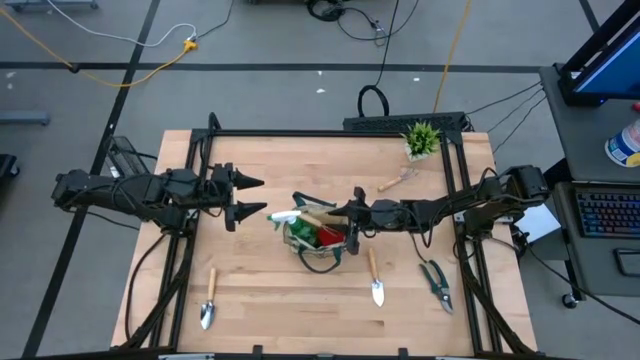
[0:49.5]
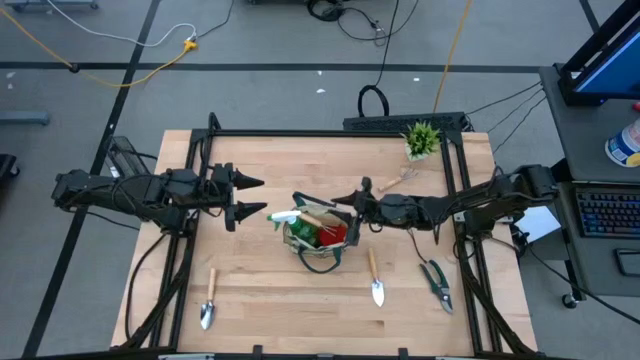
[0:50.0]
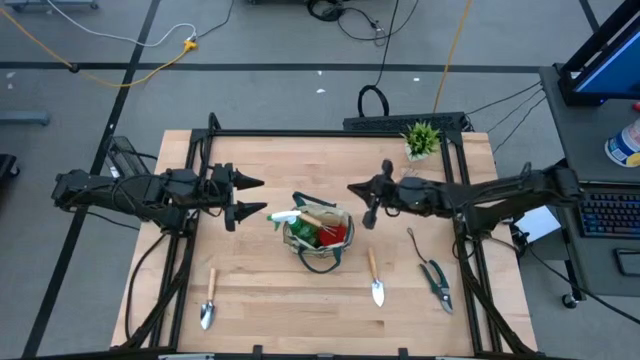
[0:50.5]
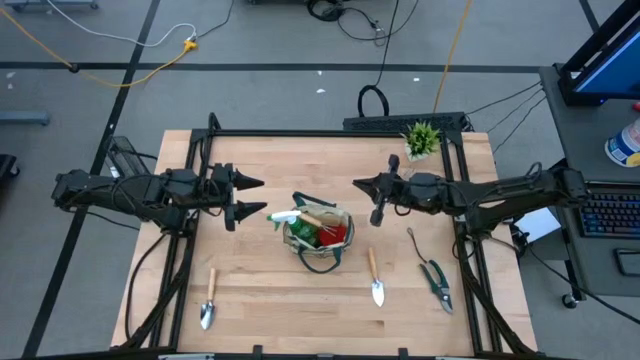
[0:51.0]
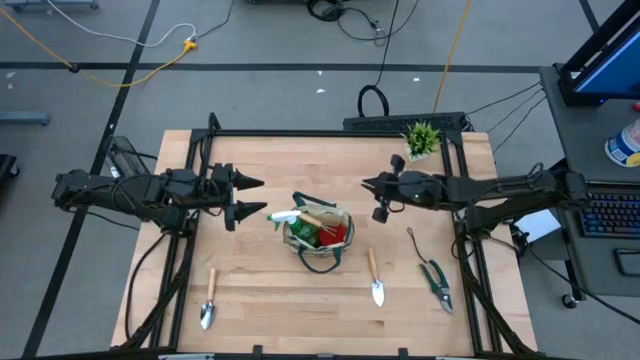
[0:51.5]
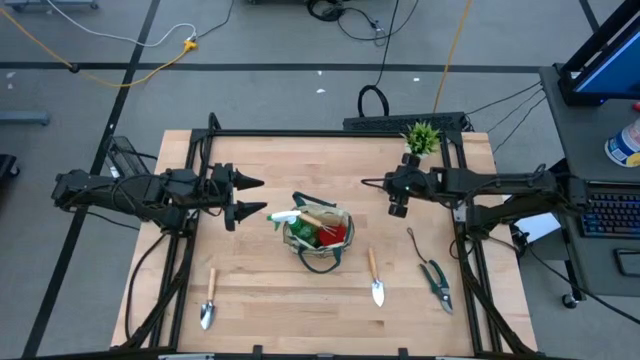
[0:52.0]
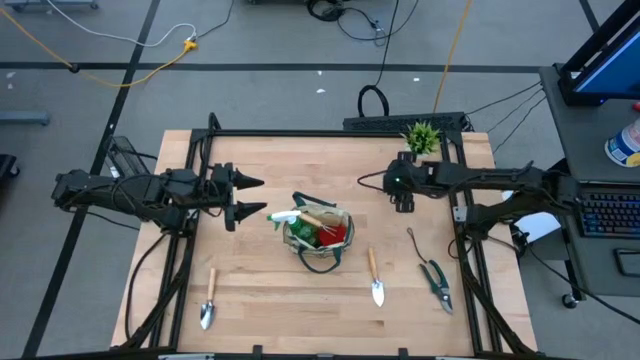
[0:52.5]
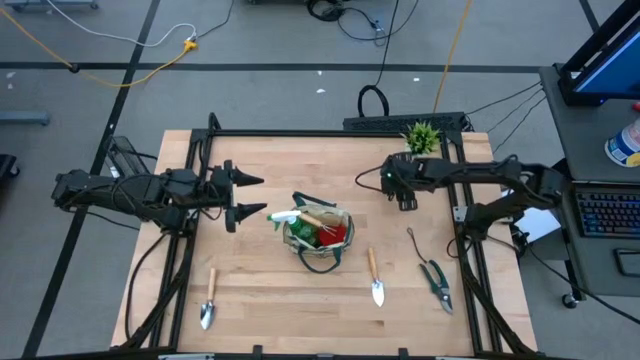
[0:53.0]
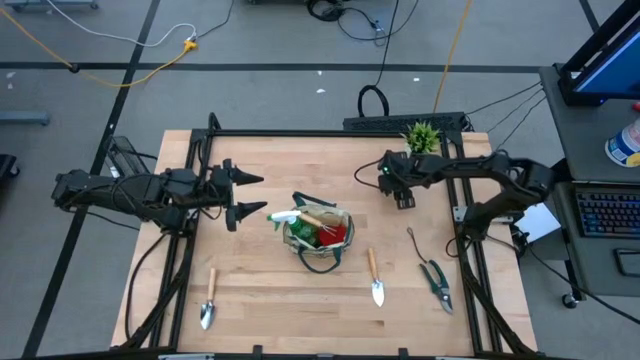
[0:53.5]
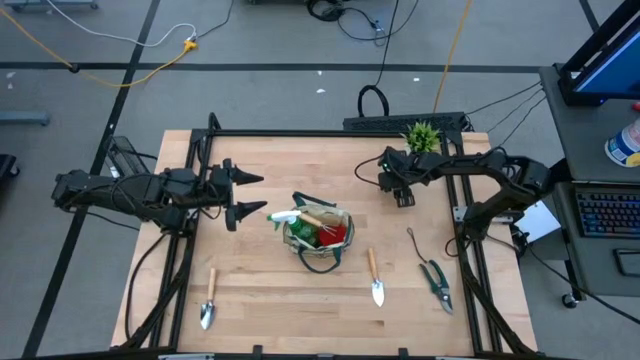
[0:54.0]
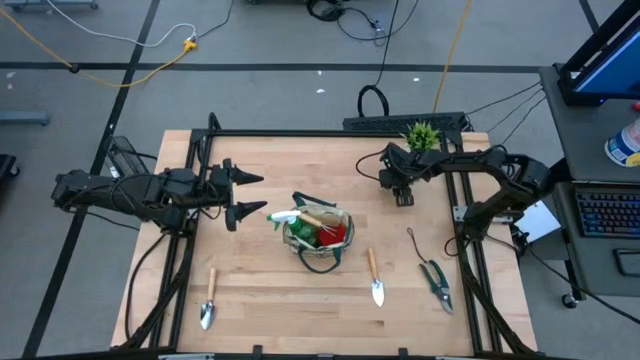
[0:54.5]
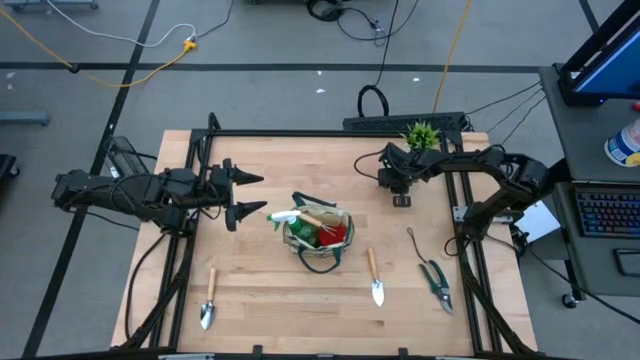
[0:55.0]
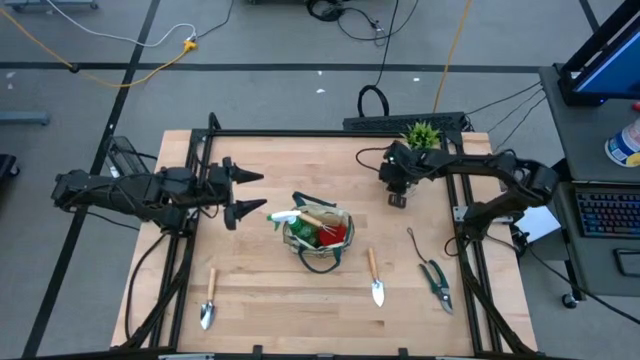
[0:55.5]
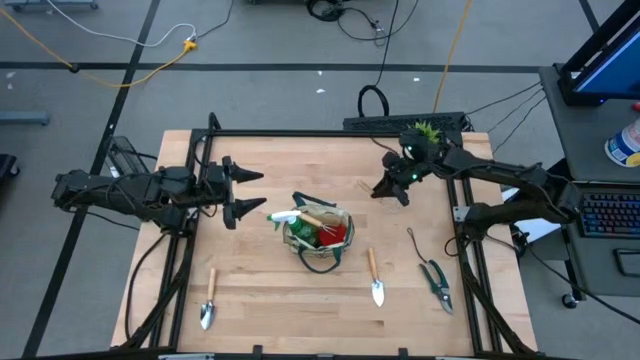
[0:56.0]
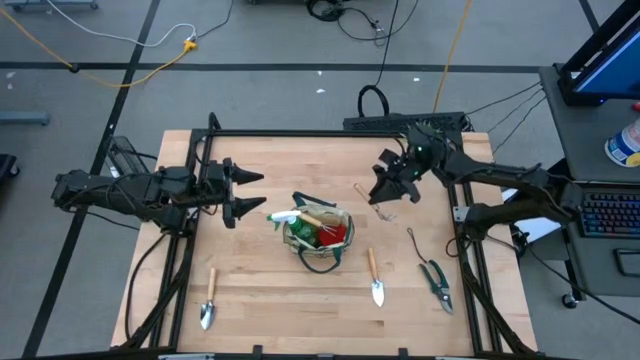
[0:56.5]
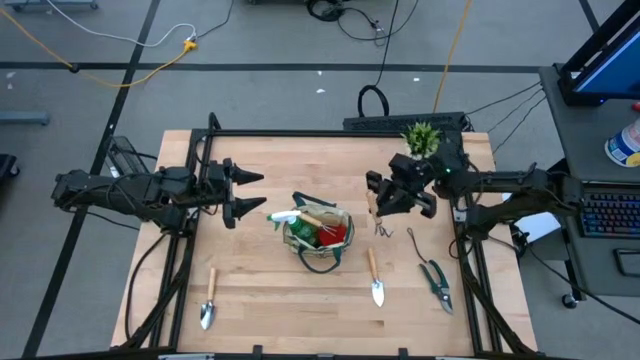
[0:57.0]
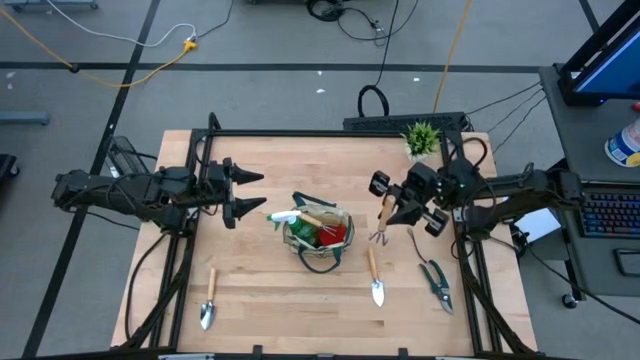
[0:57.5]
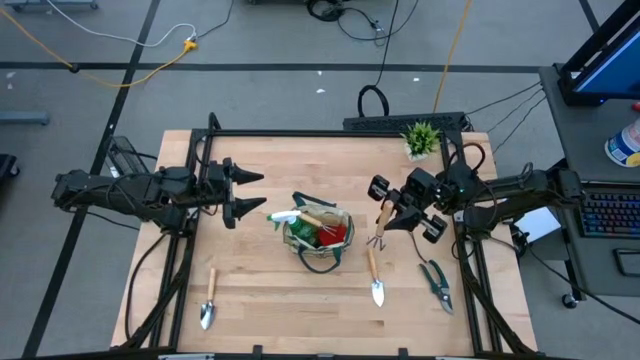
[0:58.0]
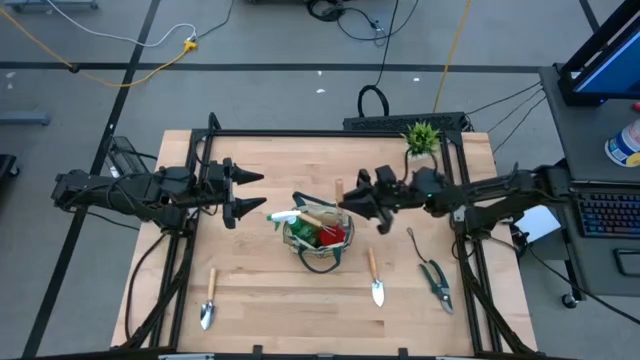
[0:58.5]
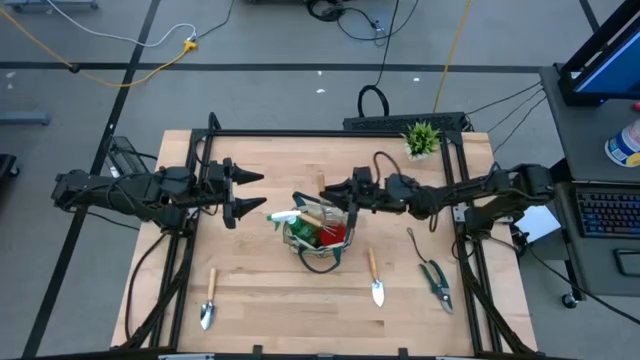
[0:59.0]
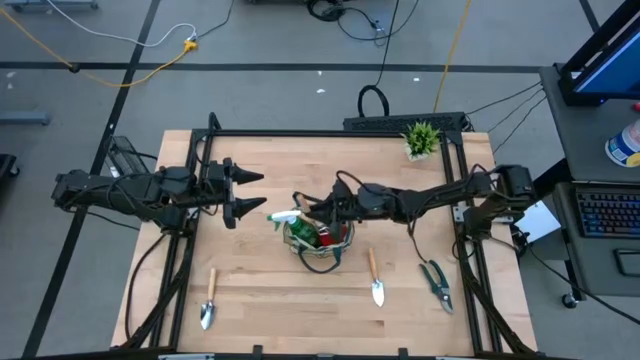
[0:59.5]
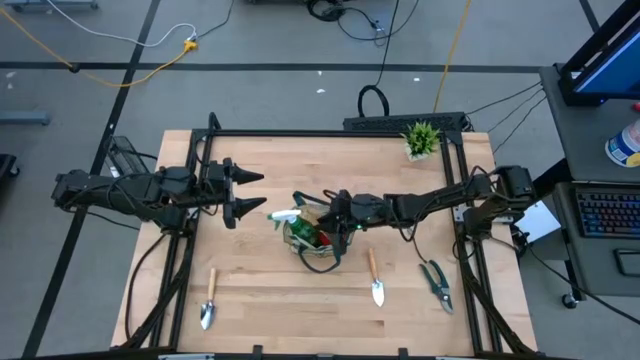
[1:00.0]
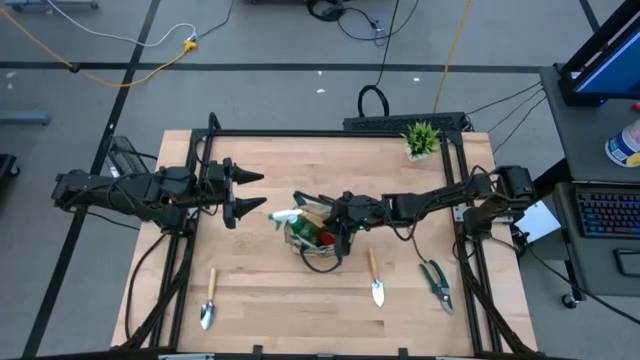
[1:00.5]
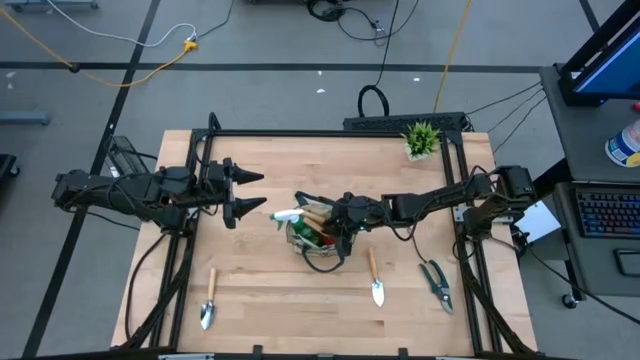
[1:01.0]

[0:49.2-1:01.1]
Task: Pick & Place Garden tools in Gardening bag
Put the brown hand rake into the gardening bag

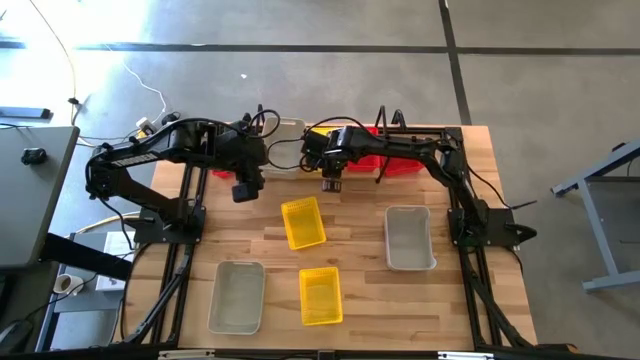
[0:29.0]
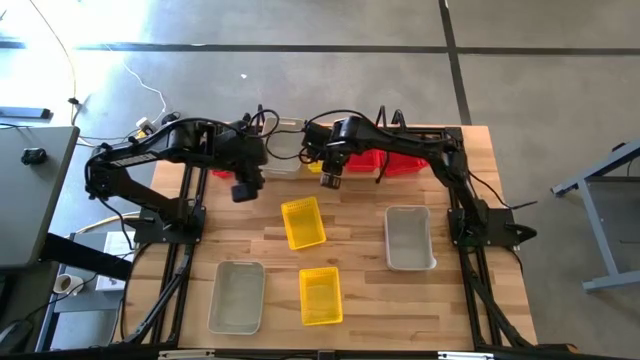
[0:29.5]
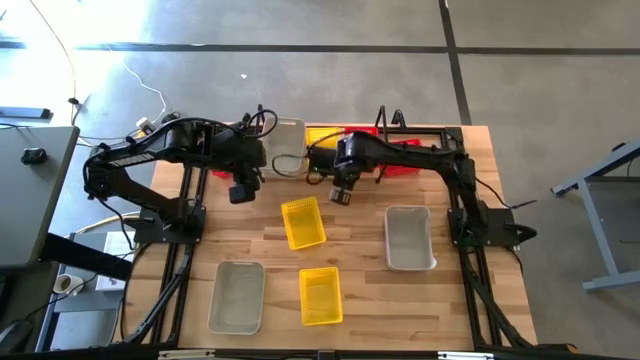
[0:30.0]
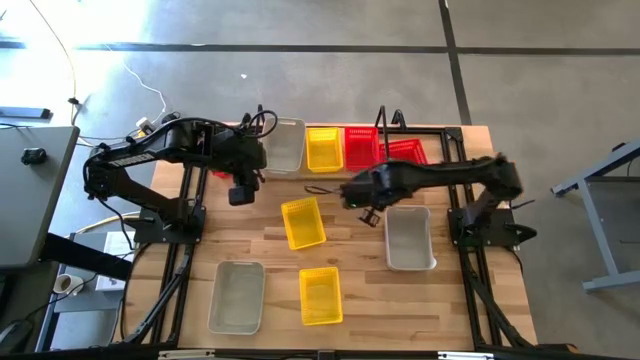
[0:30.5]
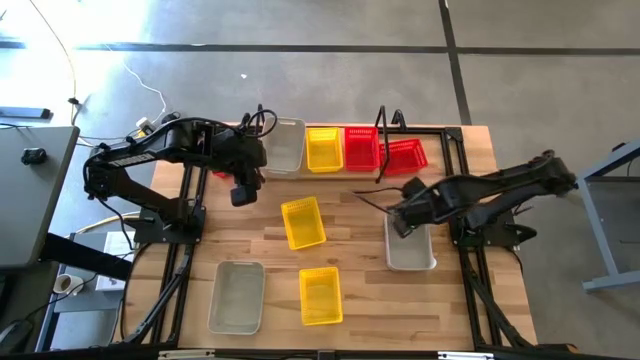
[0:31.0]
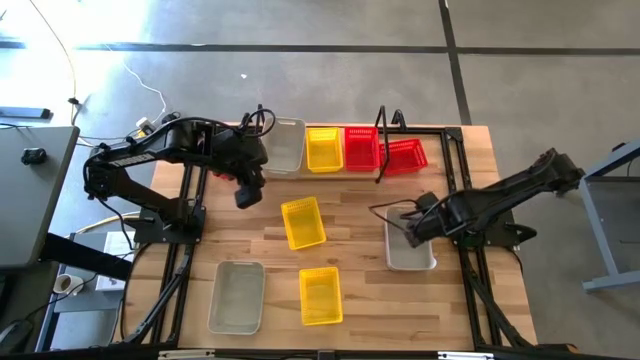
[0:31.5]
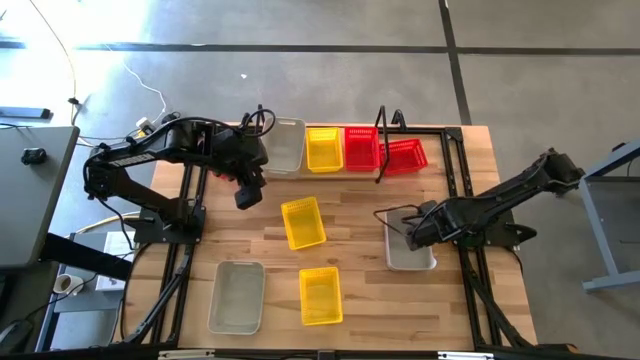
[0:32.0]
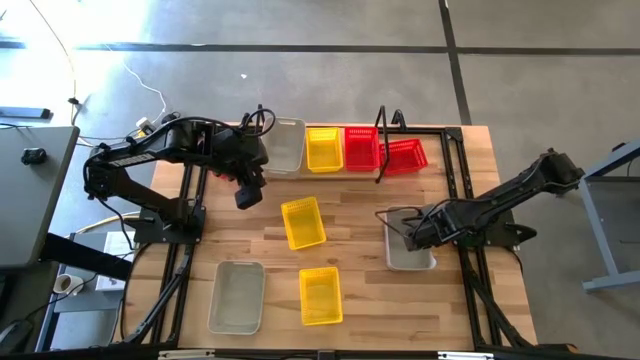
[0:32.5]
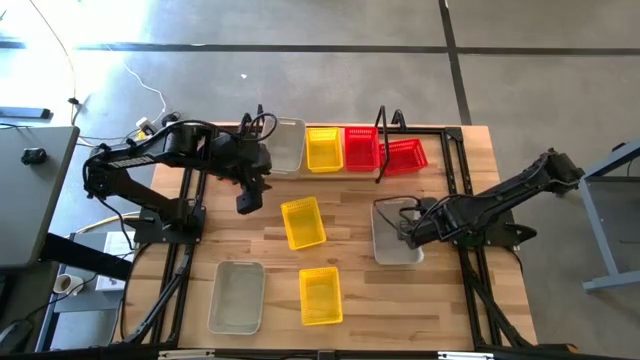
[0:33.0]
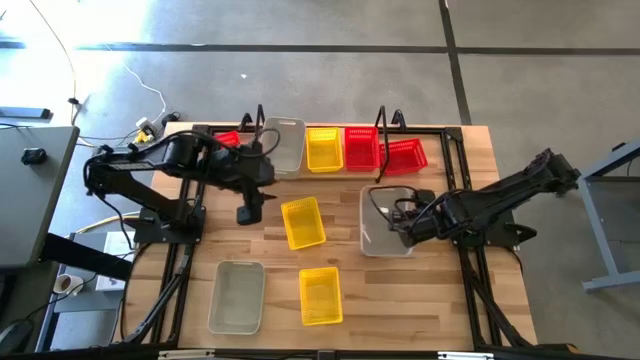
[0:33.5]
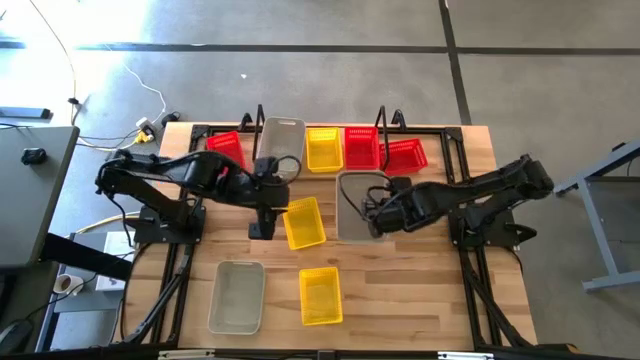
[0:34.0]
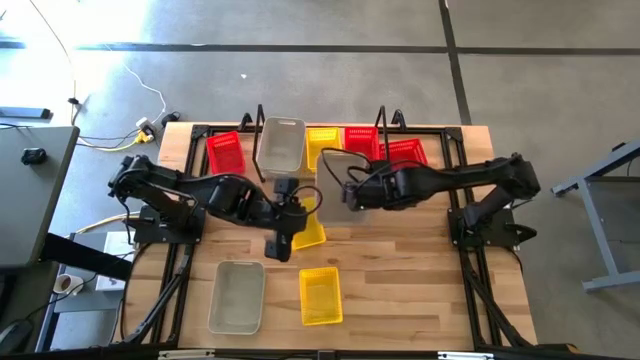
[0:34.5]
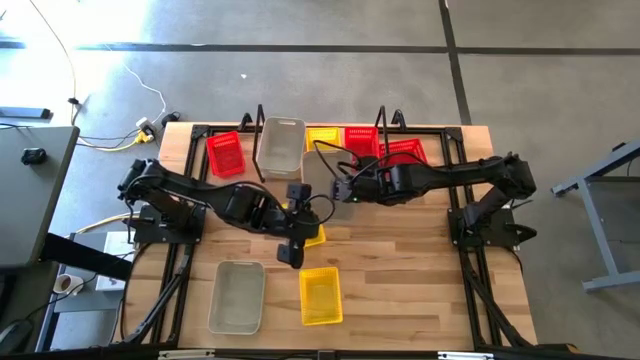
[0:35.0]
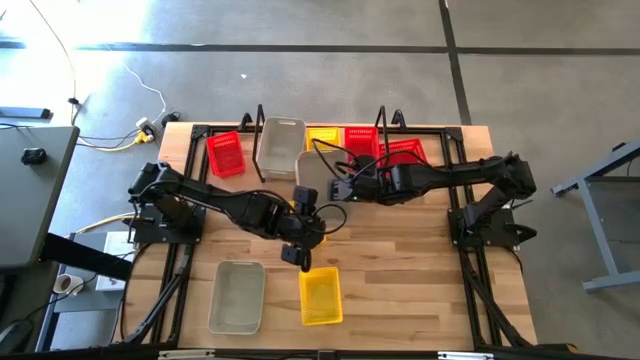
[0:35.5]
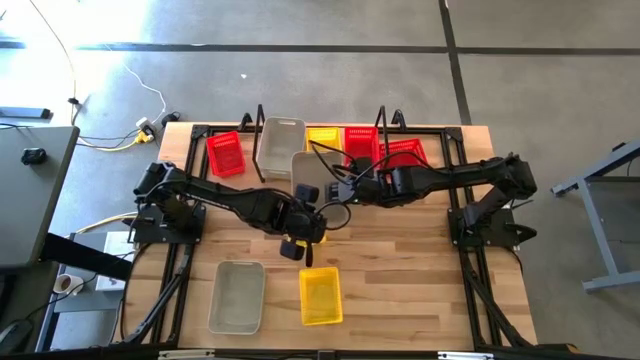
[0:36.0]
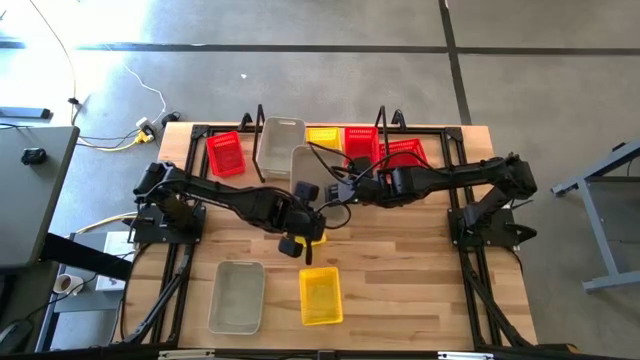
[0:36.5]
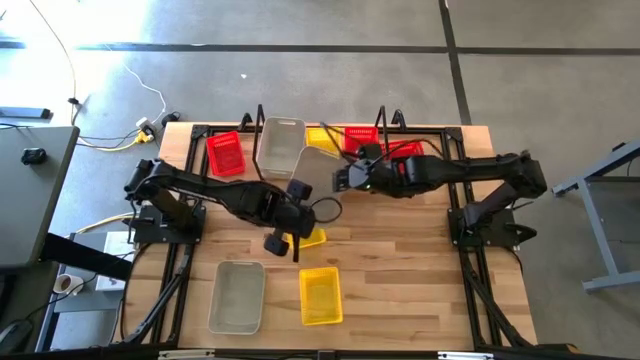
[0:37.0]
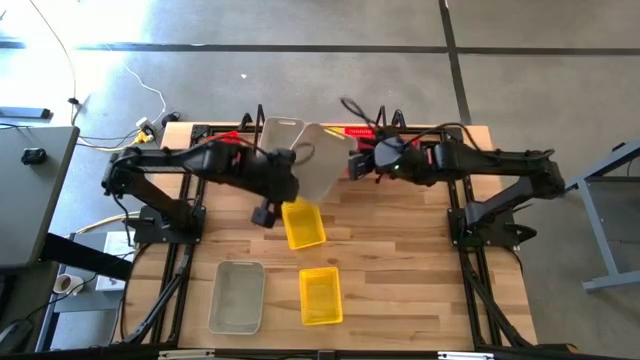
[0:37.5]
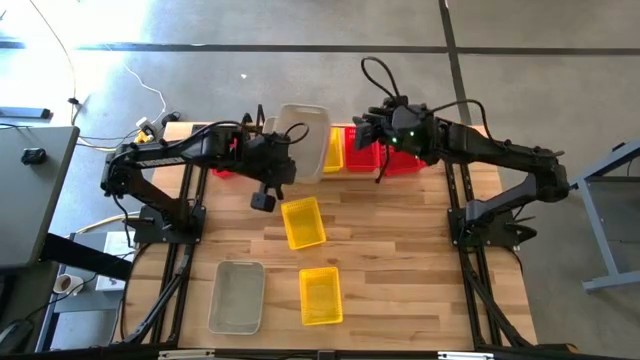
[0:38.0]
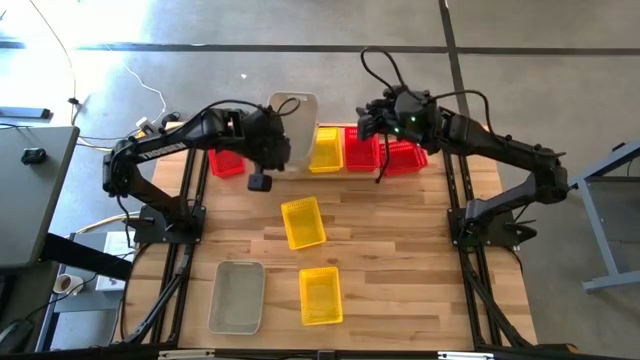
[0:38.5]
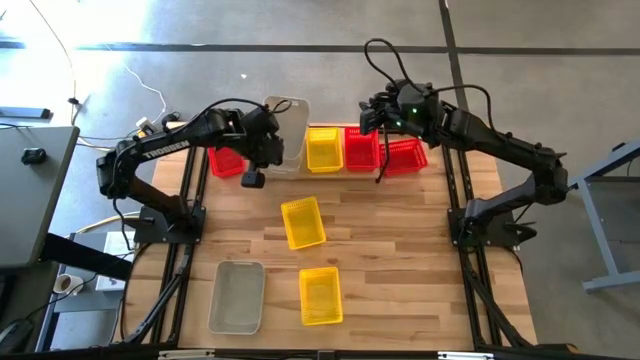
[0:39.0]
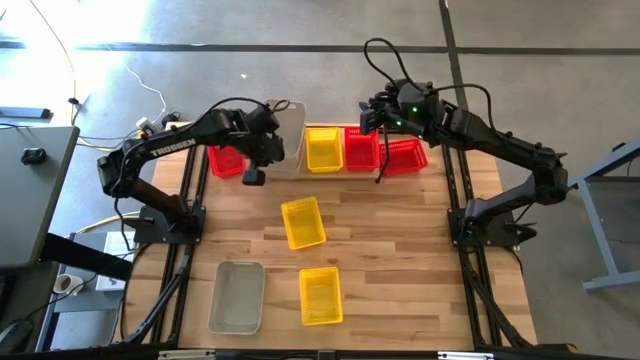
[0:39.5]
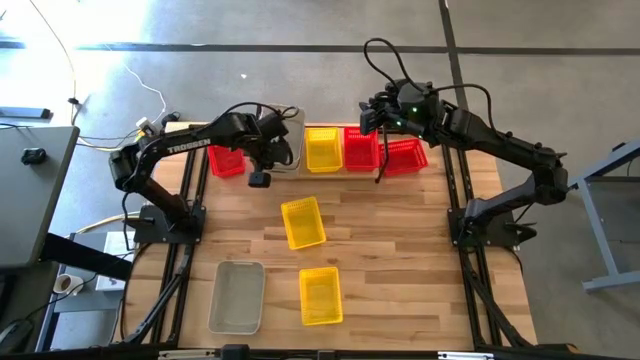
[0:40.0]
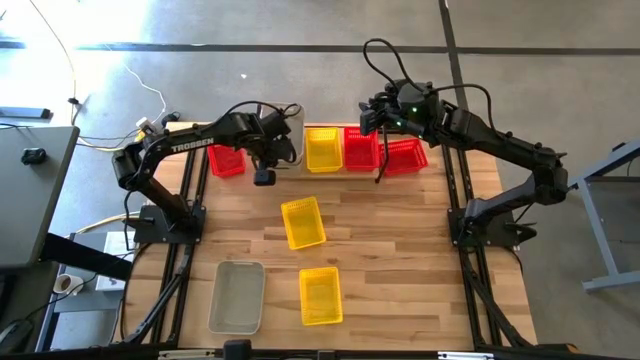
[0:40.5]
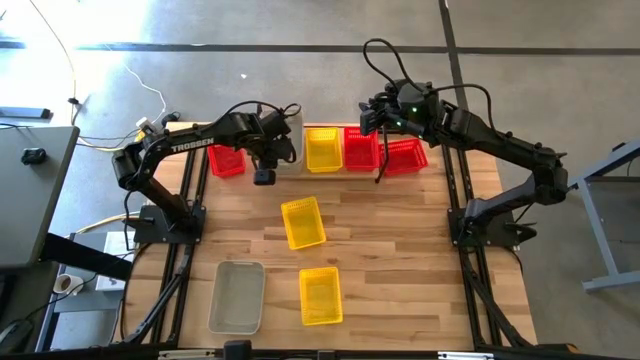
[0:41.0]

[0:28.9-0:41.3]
Task: Stack baskets on shelf by color
Stack the top gray bin on the gray bin on the shelf
